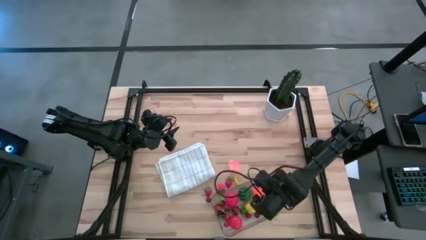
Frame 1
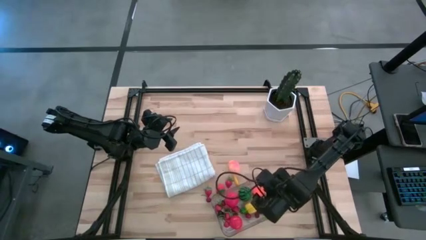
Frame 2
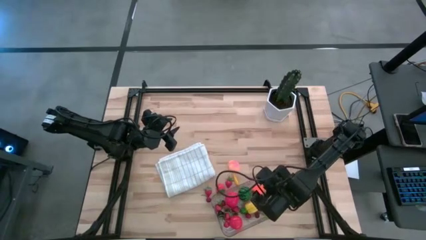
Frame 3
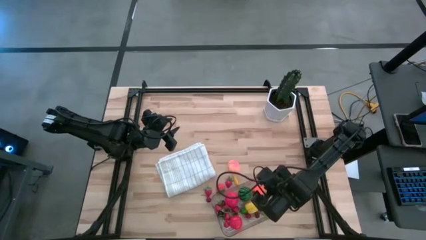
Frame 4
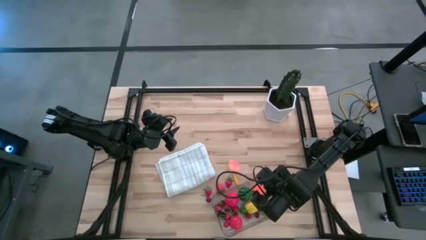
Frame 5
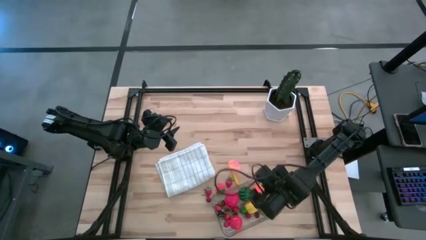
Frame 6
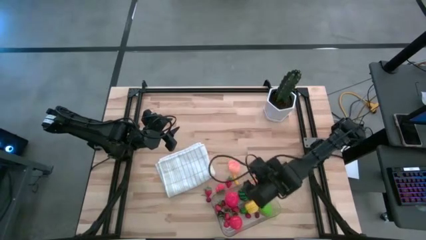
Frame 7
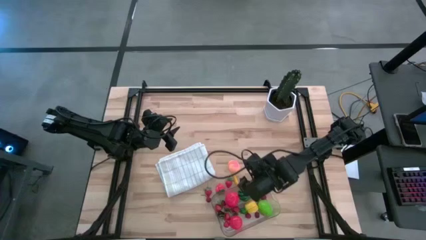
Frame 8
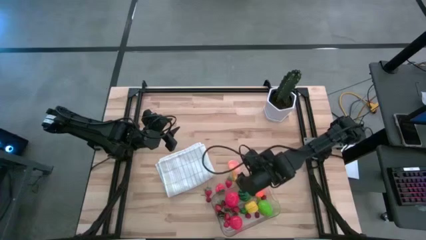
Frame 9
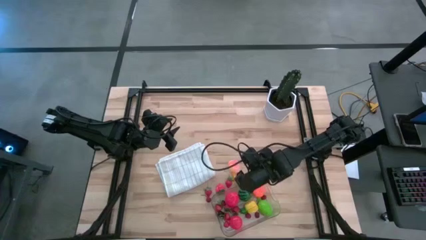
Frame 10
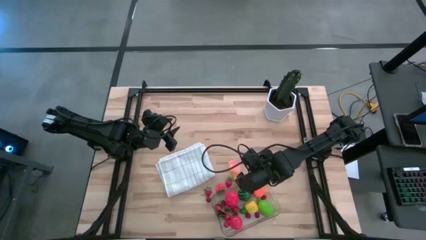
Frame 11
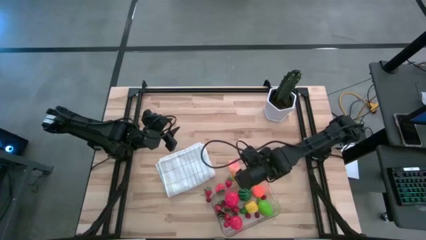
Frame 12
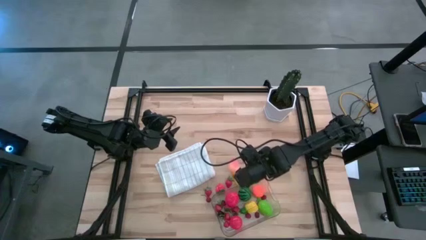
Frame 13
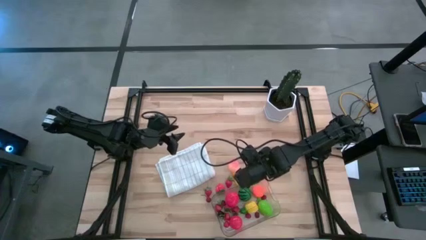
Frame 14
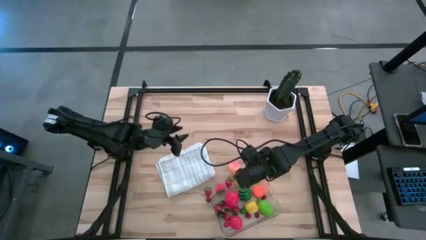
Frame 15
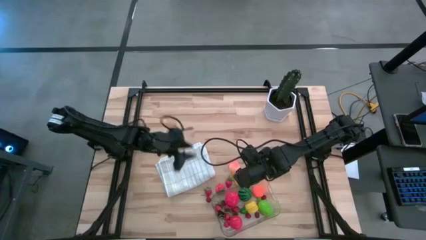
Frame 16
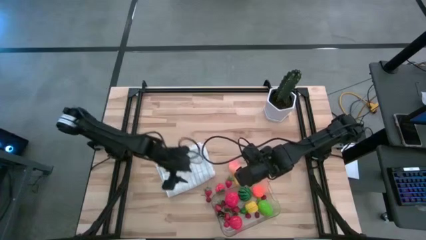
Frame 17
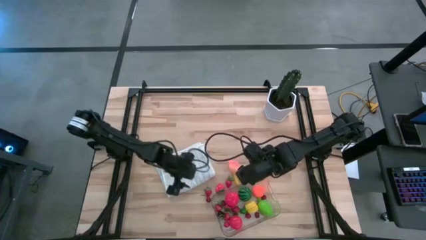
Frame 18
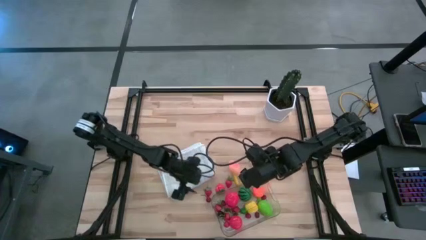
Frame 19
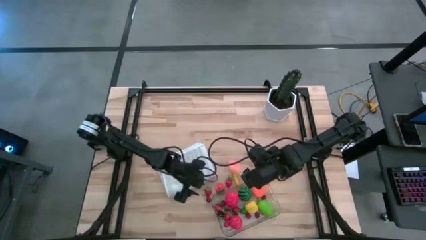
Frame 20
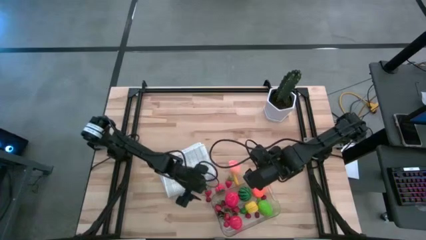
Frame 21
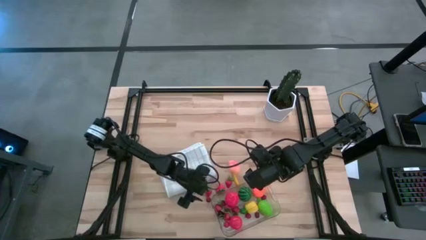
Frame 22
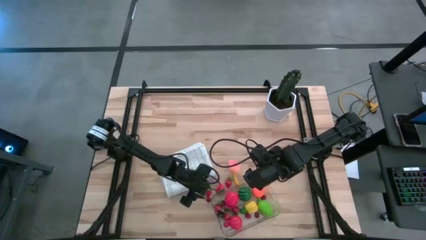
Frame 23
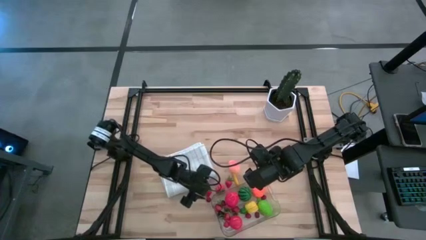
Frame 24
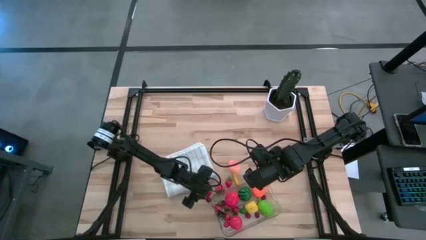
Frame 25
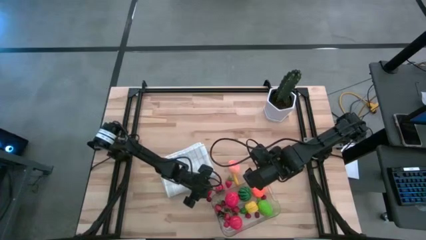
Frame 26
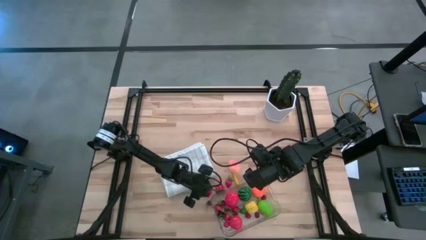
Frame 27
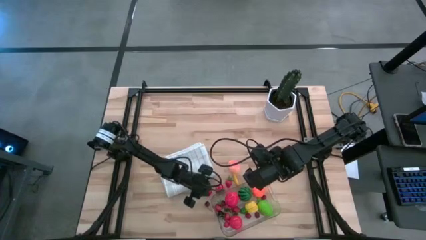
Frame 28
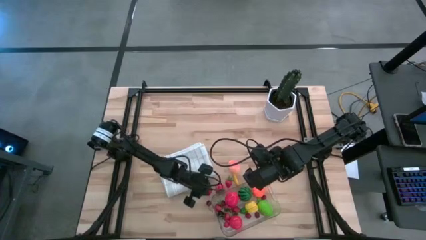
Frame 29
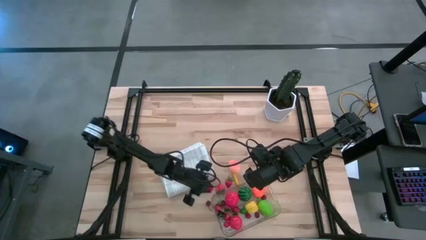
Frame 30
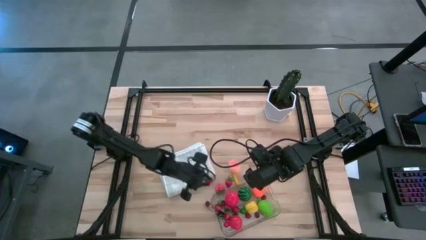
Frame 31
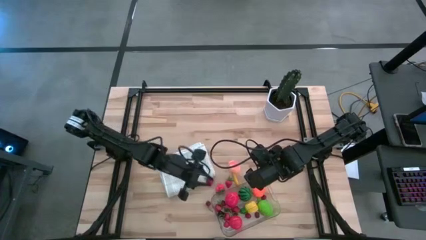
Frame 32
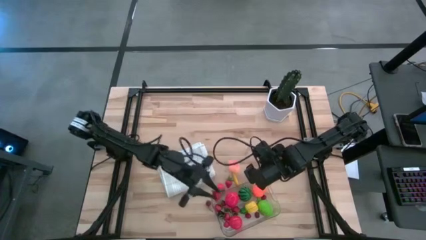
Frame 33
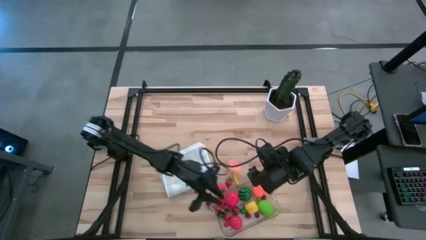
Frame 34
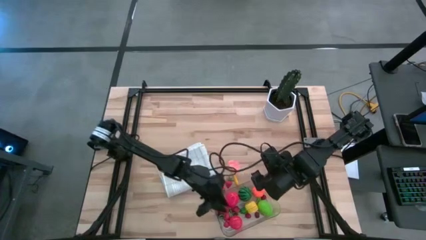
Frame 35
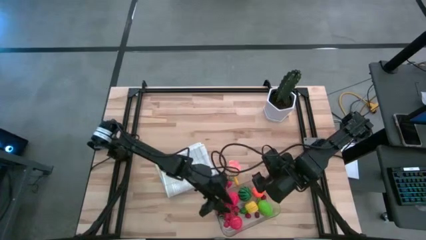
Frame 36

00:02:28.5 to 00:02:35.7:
Task: Pick and placing Produce into tupperware
Put the strawberry into the transparent bin

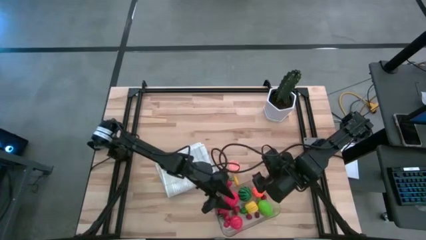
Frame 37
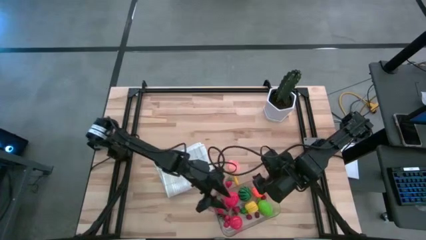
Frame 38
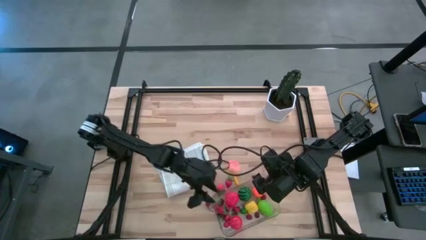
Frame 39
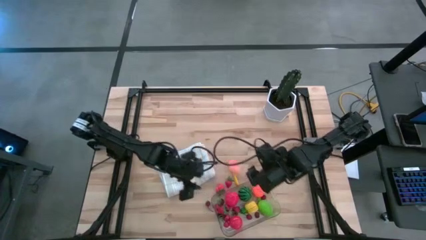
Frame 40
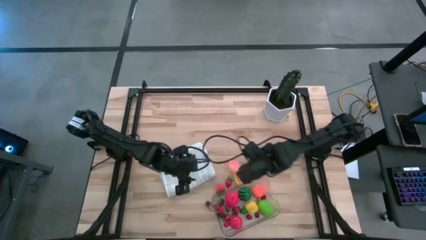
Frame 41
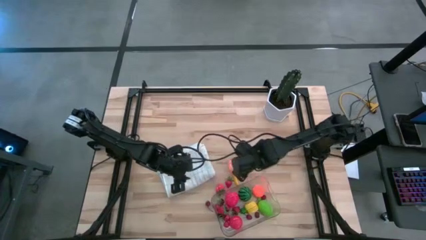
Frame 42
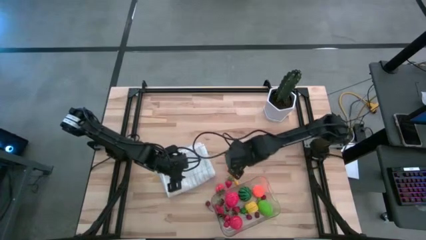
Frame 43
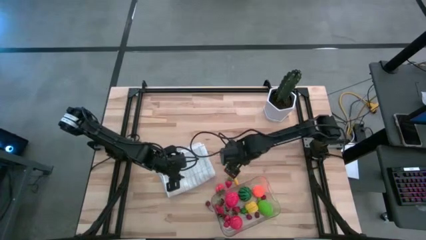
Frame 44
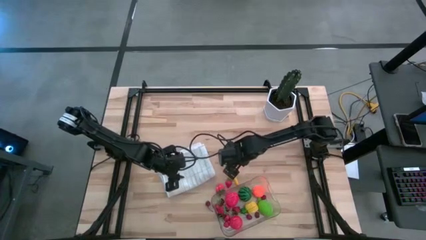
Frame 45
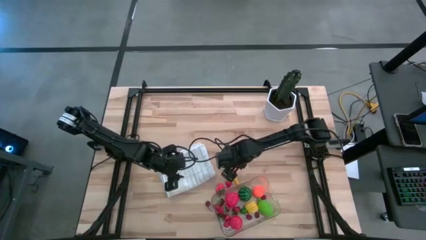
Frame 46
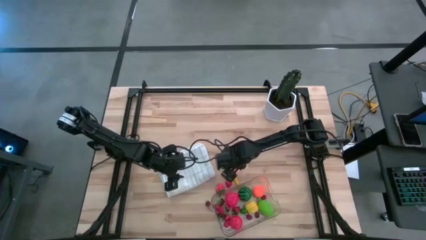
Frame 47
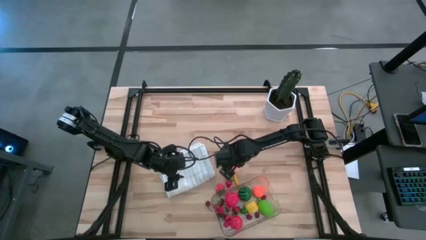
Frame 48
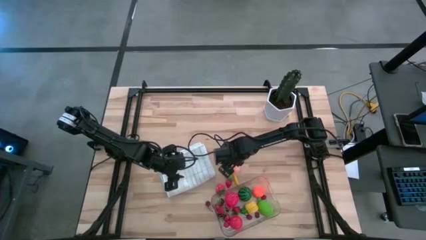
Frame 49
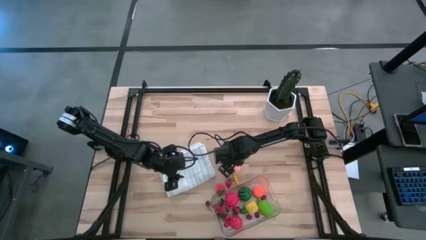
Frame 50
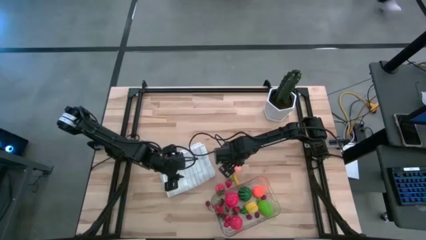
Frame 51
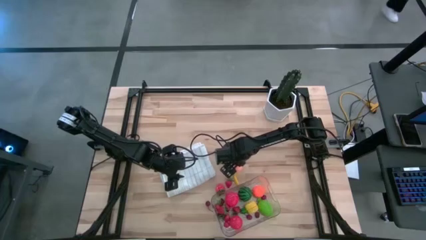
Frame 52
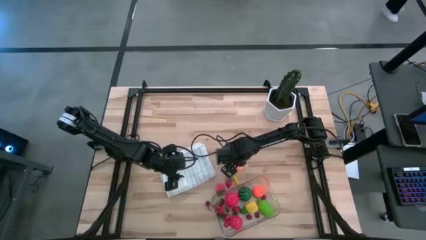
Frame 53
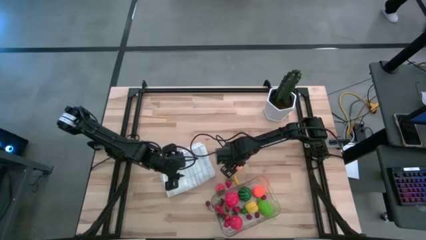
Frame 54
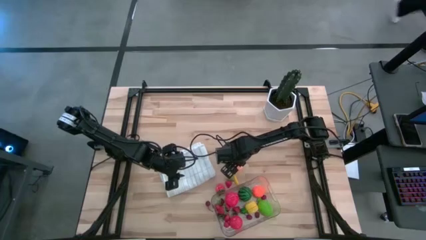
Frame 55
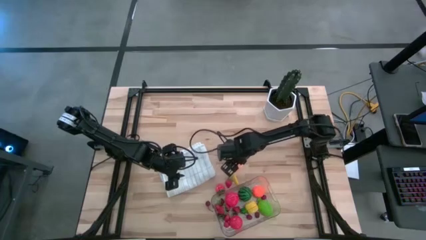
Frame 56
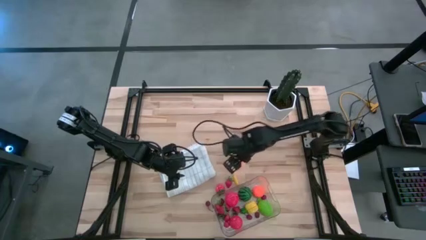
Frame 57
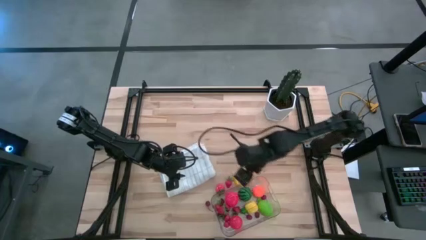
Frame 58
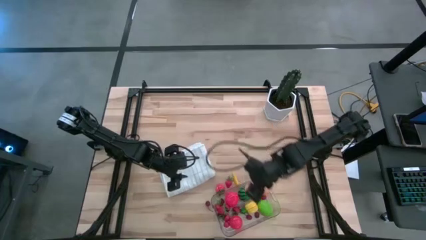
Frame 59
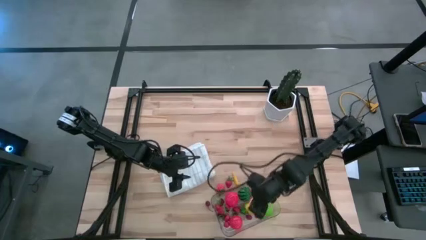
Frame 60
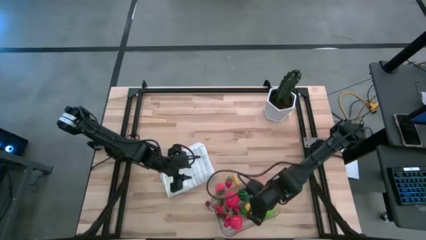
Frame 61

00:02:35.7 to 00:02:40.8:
Put the peach into the transparent bin

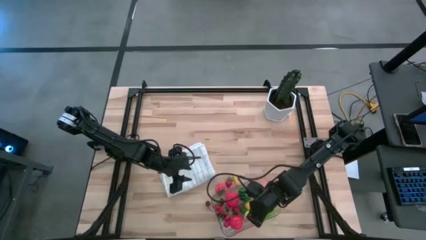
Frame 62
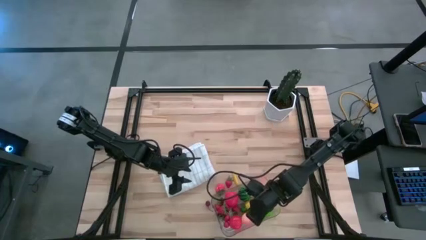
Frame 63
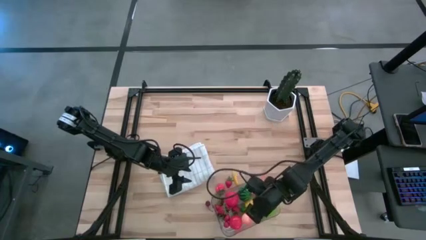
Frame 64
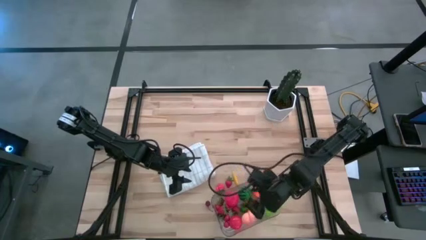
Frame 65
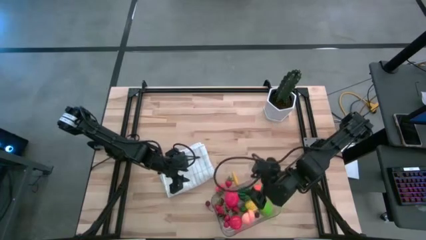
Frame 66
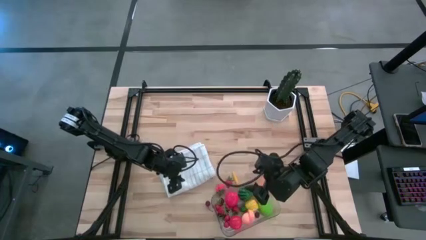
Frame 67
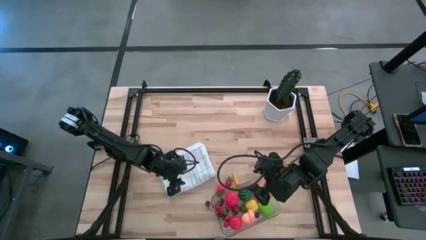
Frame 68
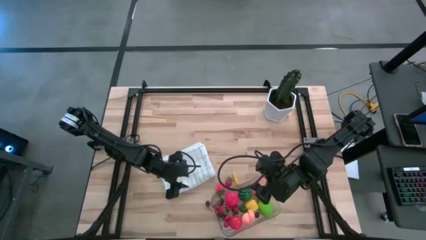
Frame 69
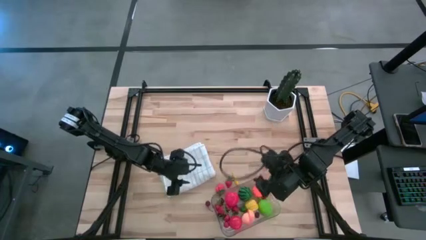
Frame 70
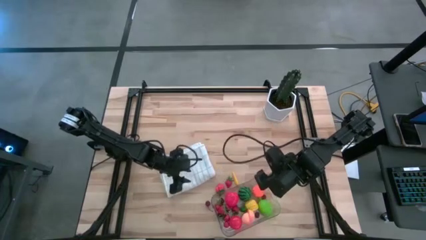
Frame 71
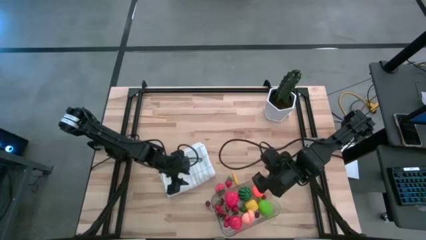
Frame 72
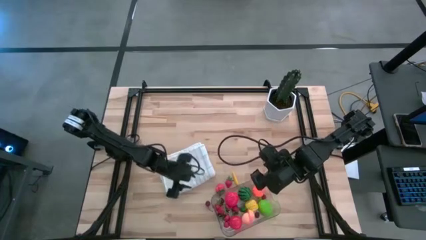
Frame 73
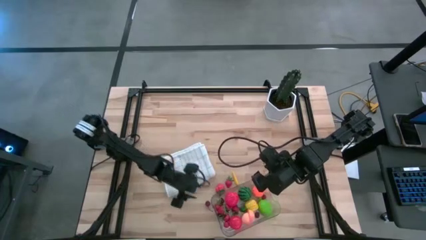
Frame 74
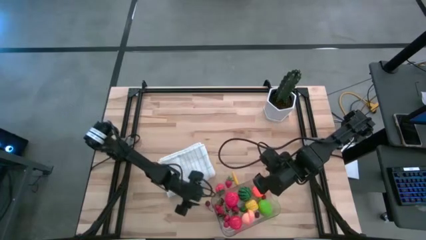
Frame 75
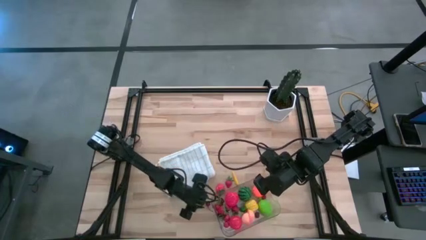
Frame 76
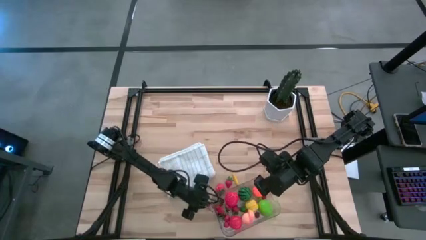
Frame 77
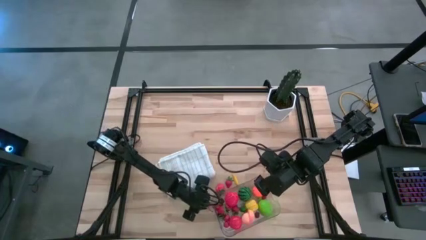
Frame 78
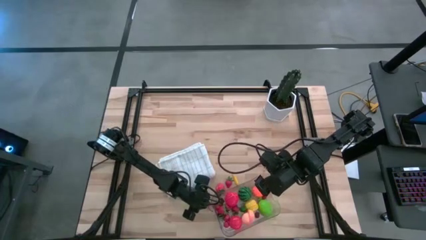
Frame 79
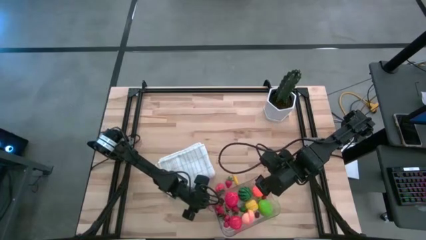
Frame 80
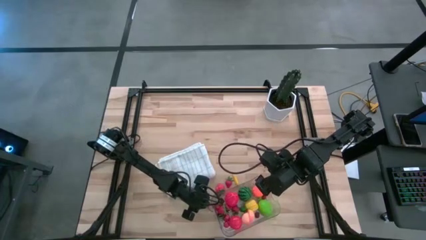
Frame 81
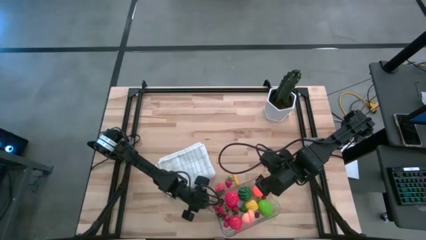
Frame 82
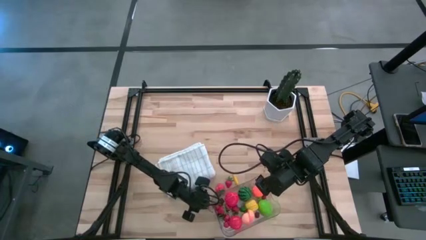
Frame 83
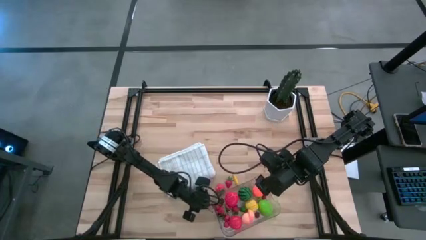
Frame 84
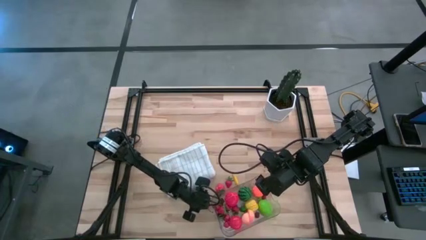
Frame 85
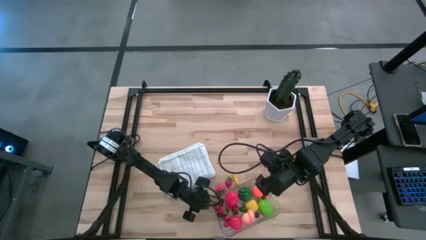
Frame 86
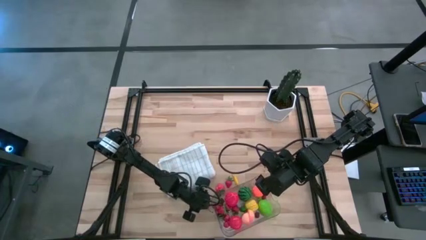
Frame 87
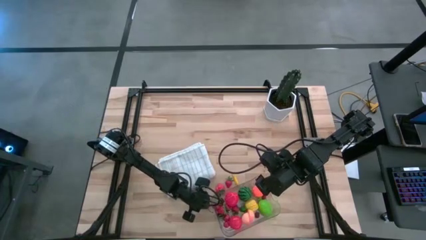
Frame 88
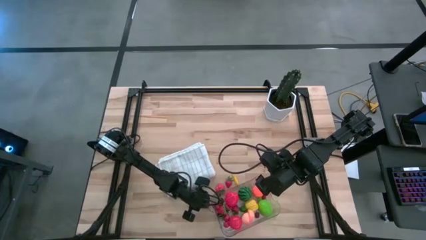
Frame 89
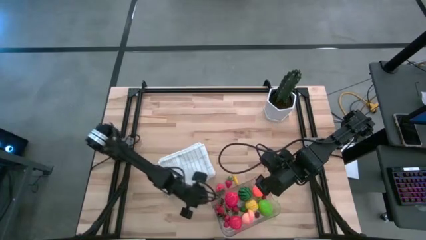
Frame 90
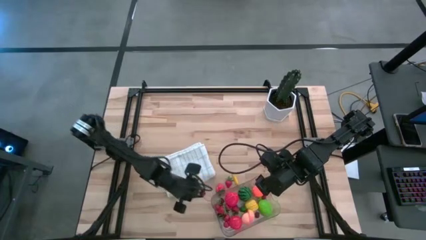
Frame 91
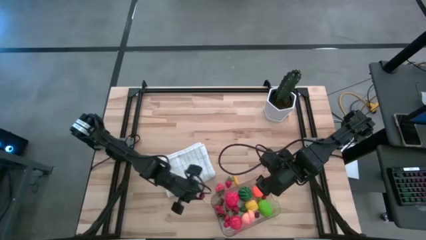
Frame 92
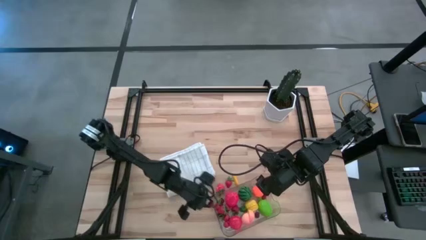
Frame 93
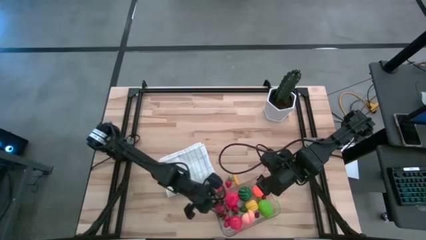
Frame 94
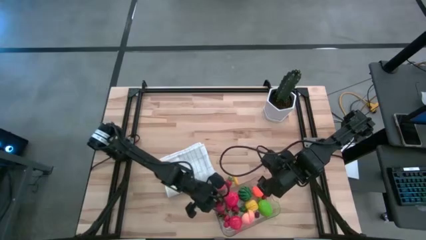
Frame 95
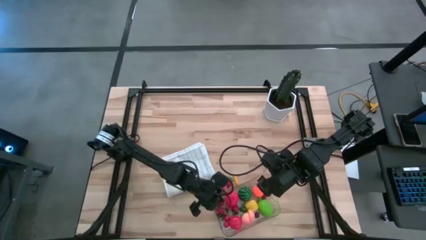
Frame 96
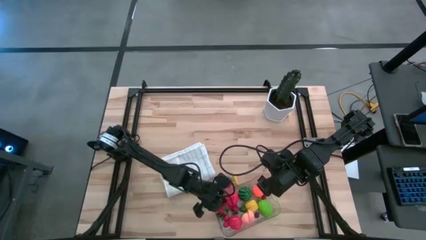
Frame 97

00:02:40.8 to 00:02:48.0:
Put the red cherry into the transparent bin
